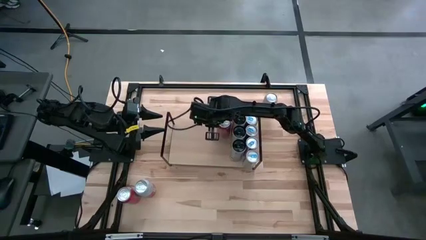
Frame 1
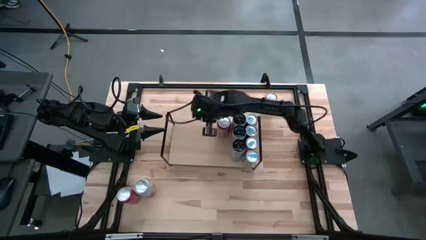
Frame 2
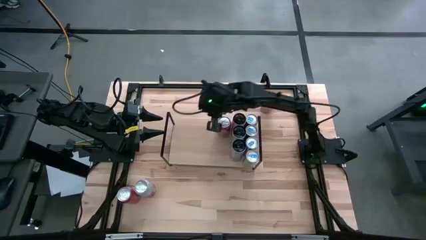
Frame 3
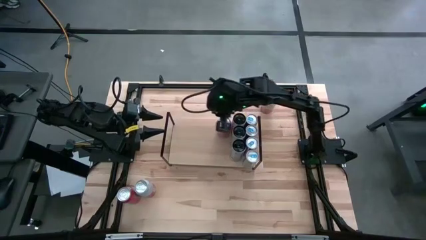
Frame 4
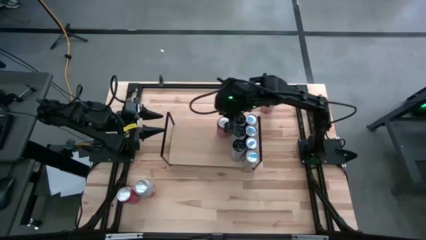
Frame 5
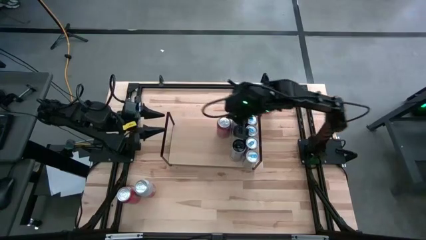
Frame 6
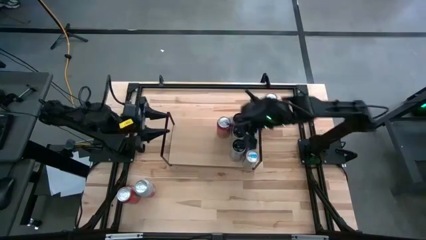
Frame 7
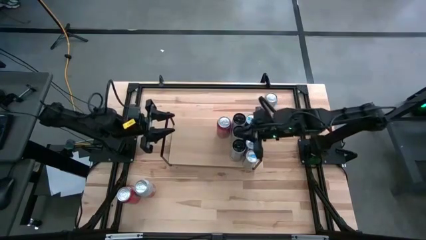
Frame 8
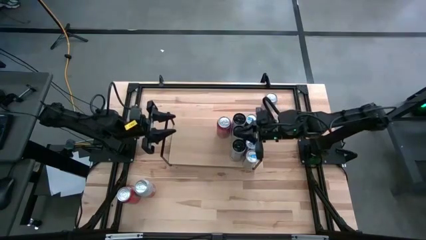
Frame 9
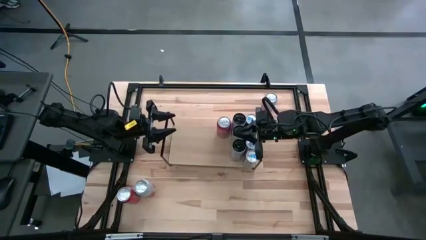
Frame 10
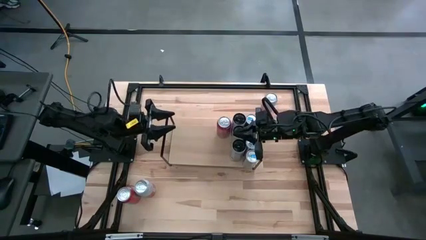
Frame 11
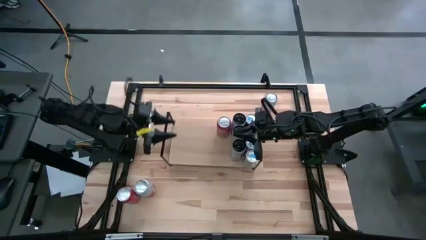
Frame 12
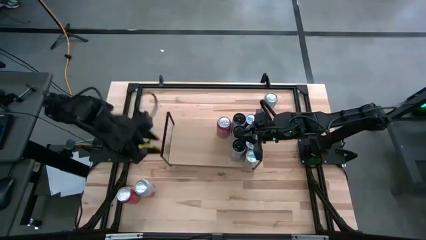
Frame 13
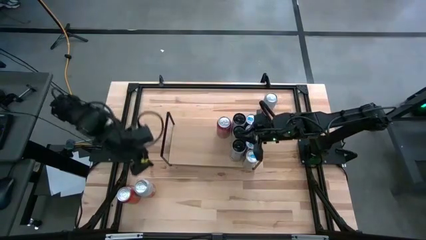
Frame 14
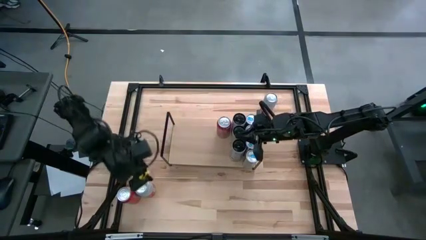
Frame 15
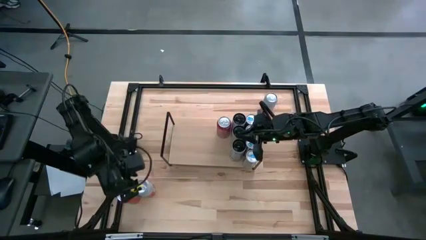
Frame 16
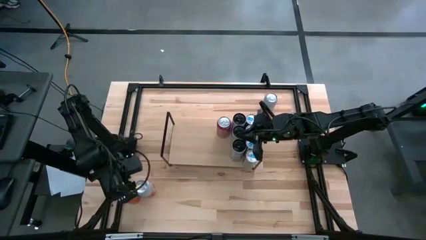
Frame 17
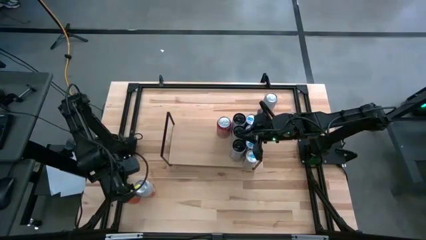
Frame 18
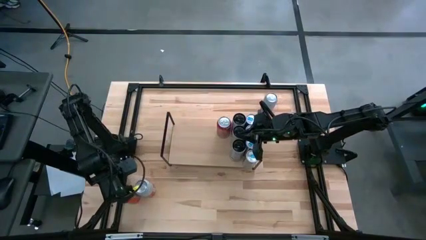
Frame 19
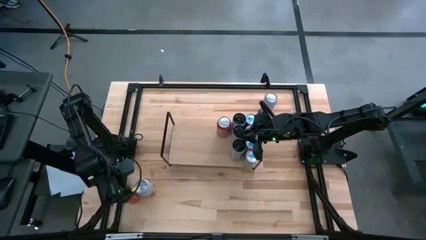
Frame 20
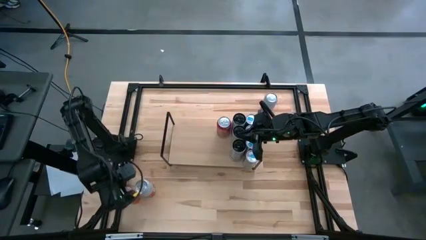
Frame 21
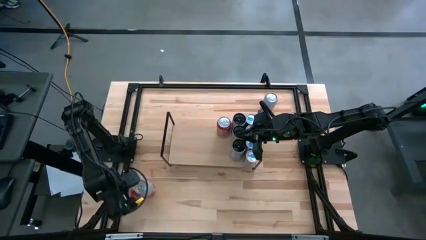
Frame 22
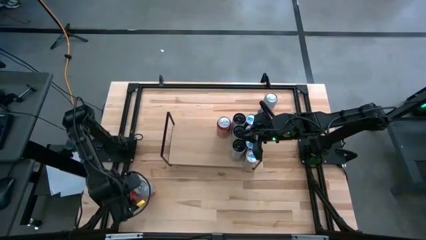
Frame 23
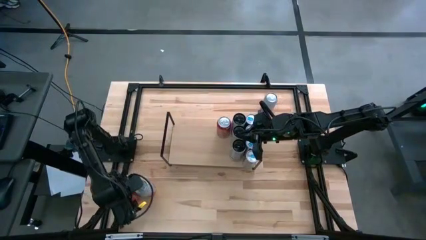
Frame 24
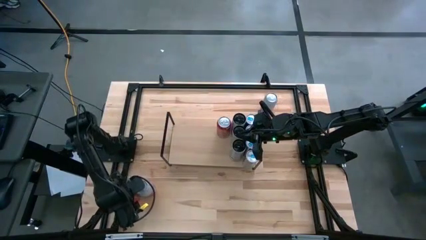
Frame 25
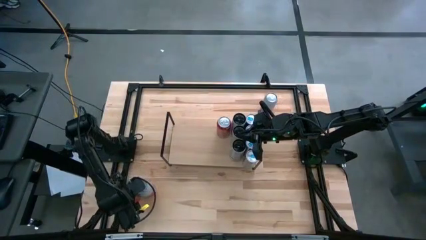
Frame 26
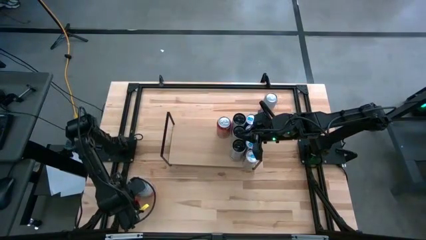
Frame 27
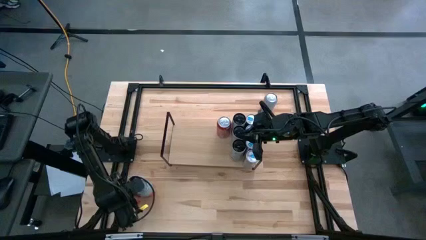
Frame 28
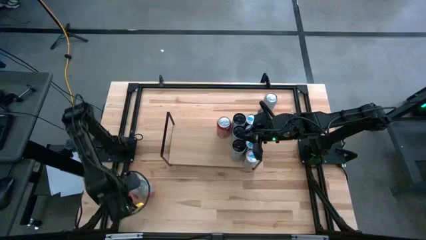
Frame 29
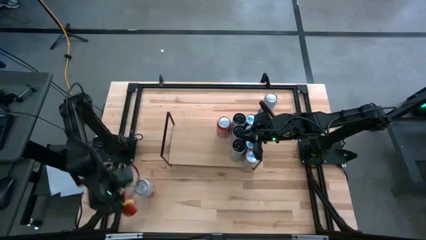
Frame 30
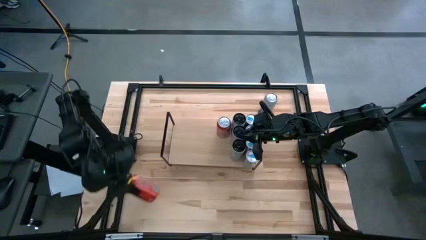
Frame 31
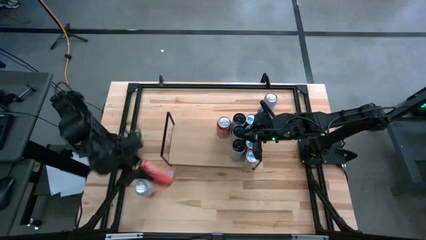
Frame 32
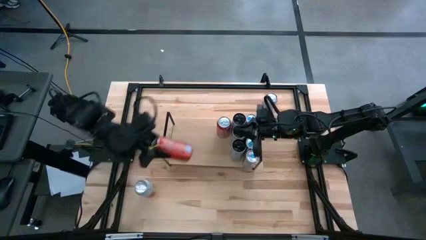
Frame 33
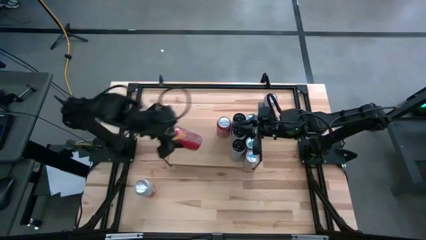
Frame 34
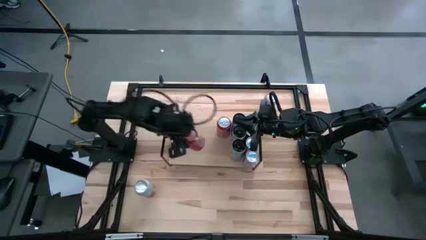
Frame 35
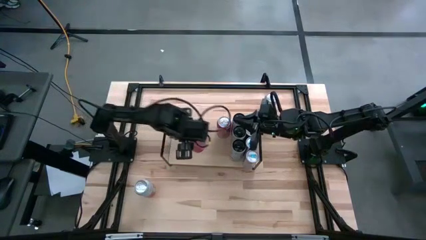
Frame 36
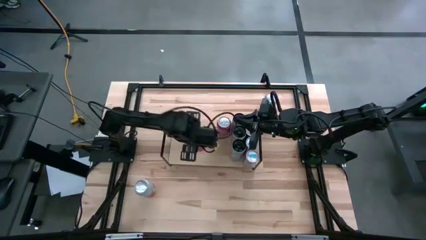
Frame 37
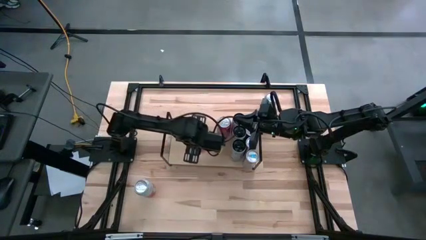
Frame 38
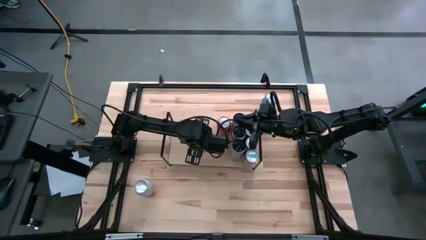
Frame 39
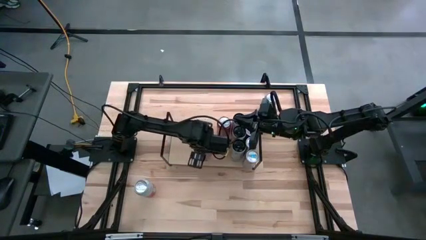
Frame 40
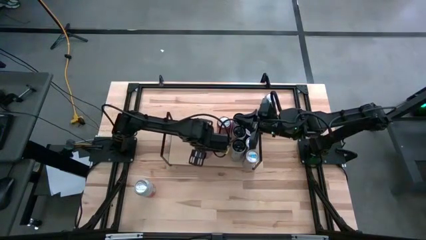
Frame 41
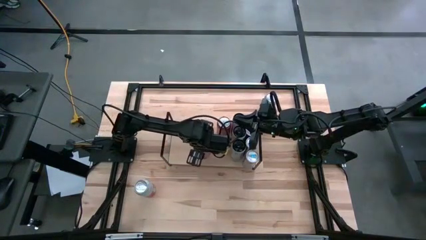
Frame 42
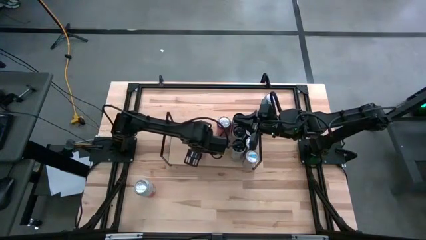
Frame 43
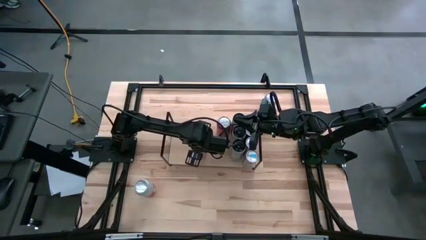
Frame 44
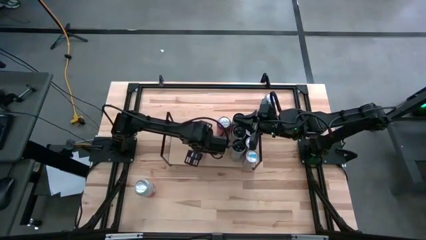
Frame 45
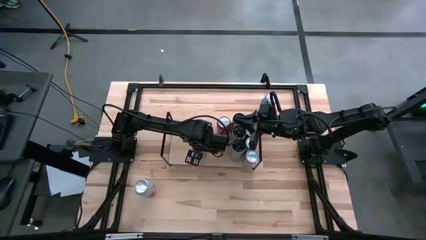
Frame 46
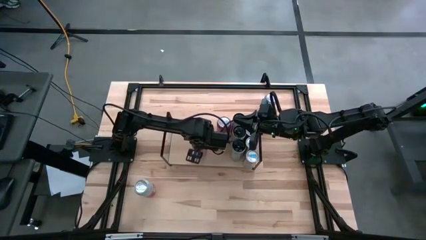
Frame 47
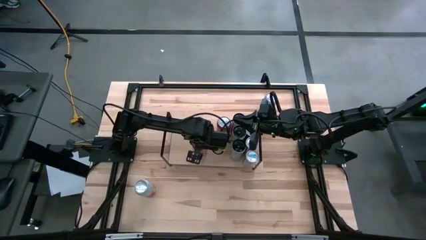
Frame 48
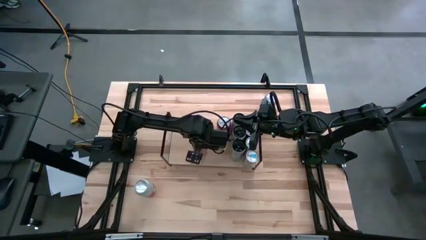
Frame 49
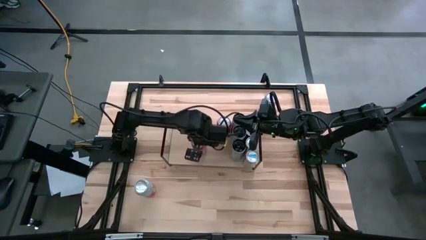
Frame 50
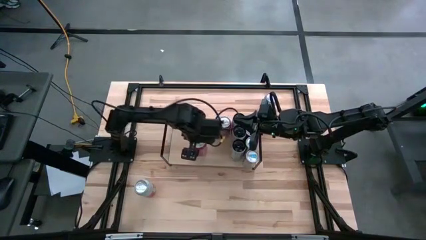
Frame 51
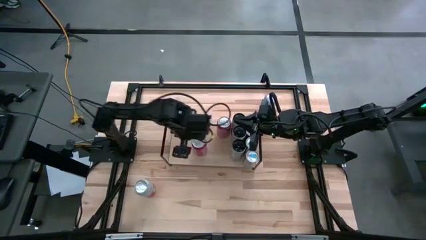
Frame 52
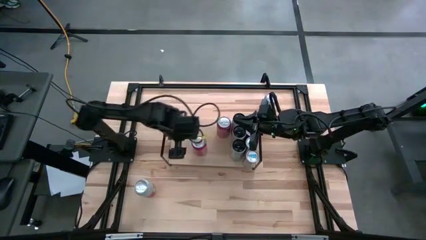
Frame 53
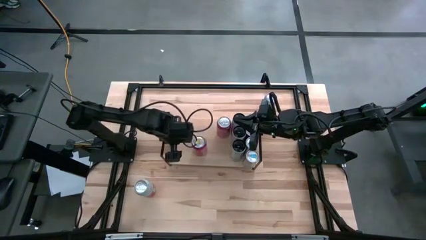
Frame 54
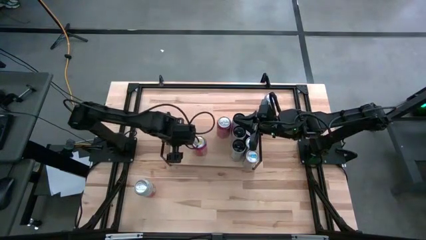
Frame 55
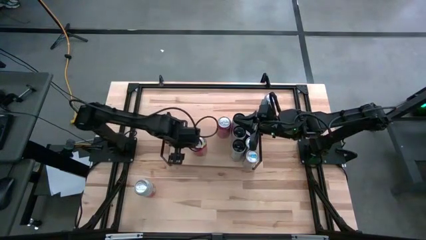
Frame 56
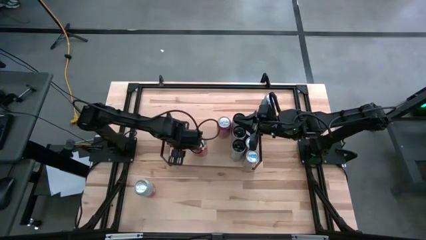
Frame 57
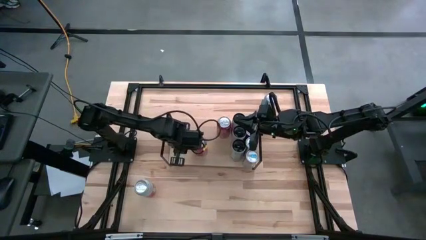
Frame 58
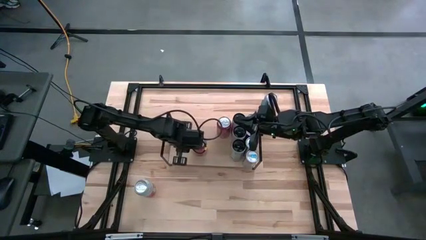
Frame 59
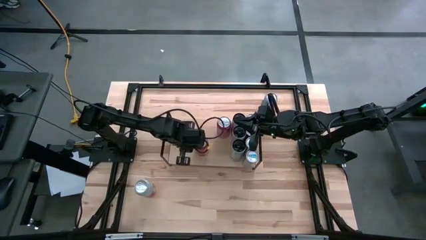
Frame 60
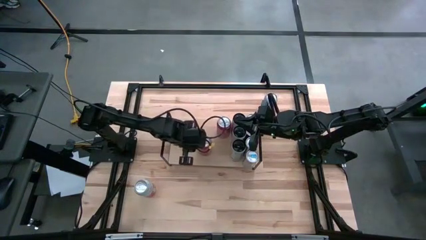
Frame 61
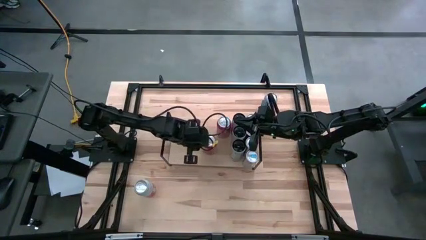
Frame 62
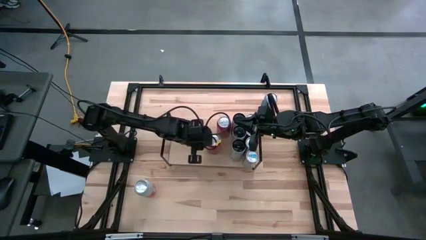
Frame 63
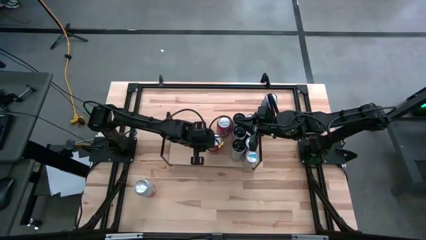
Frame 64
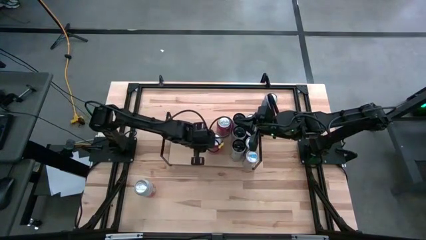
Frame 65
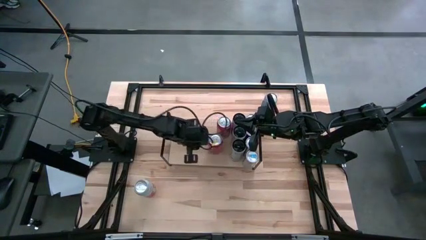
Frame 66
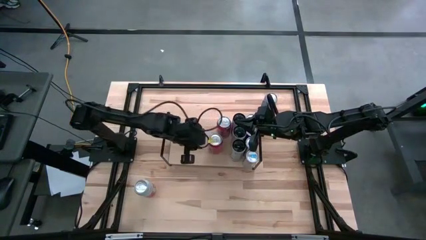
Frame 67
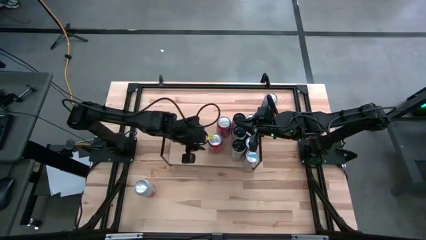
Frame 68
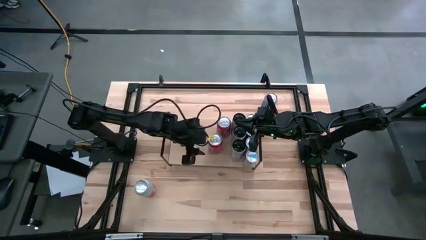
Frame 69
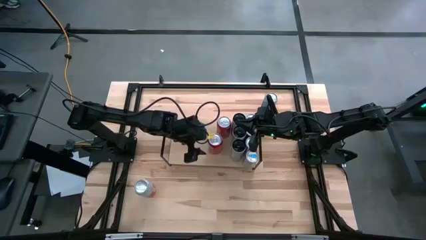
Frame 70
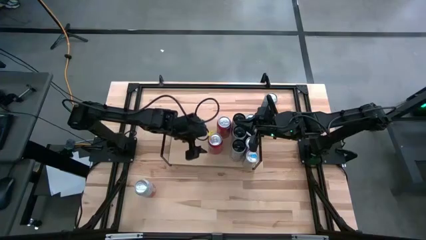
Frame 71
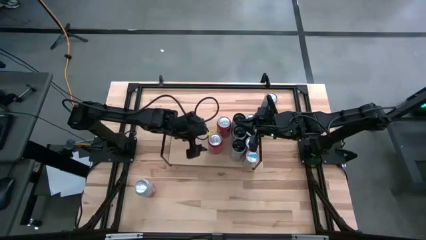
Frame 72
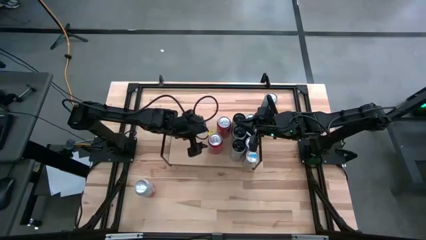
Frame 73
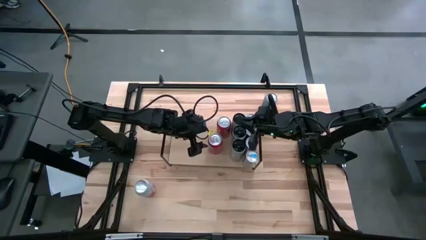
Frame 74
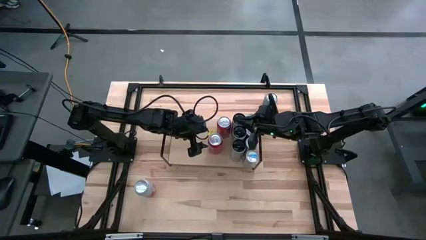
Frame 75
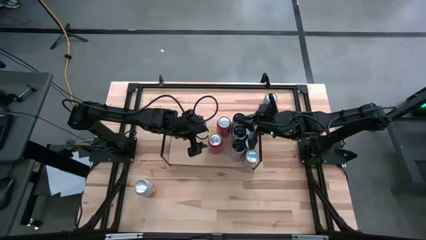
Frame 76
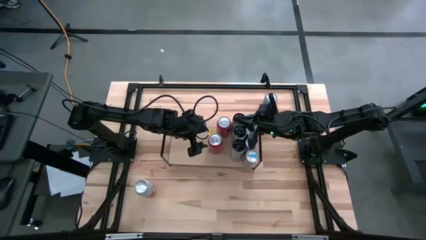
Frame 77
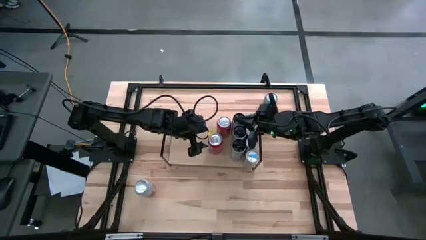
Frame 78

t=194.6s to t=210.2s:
Task: Place canned beverage on shelf
Put the orange soda can aligned with the other orange soda can on the shelf
